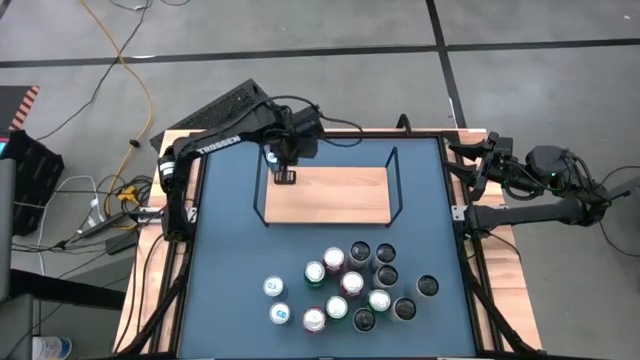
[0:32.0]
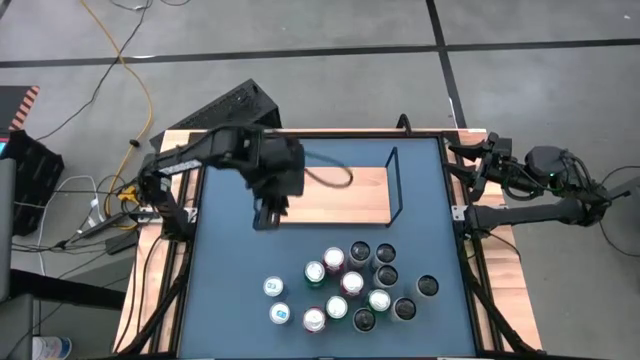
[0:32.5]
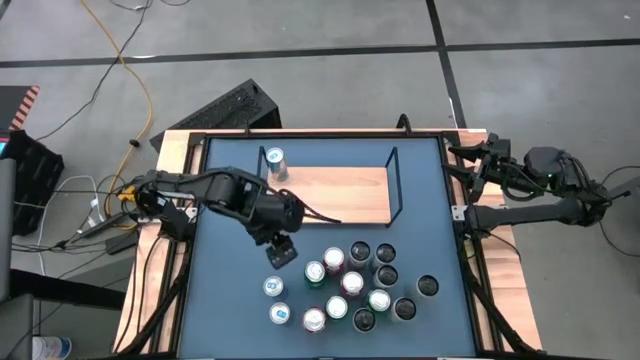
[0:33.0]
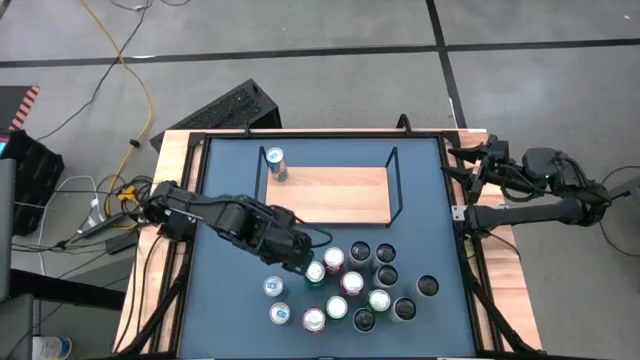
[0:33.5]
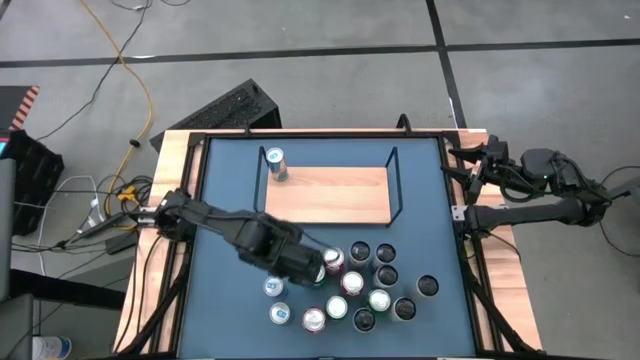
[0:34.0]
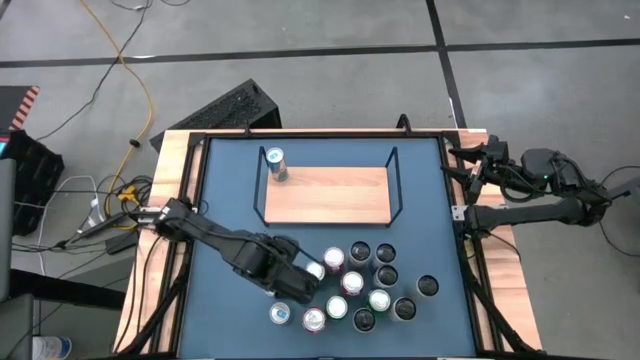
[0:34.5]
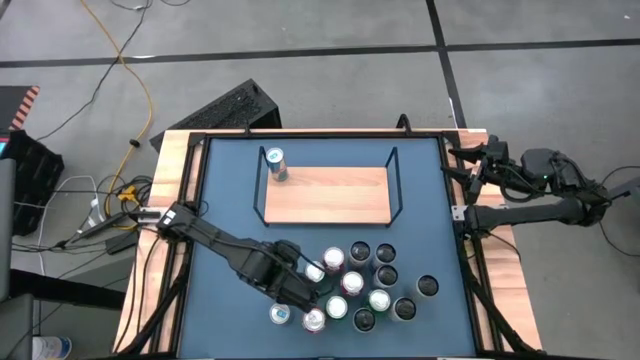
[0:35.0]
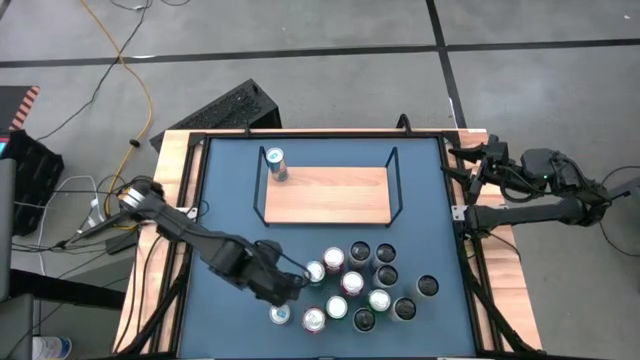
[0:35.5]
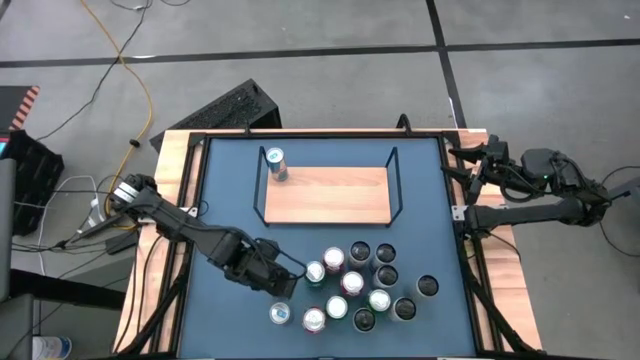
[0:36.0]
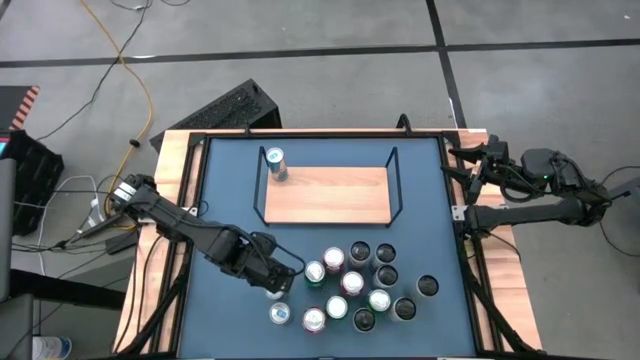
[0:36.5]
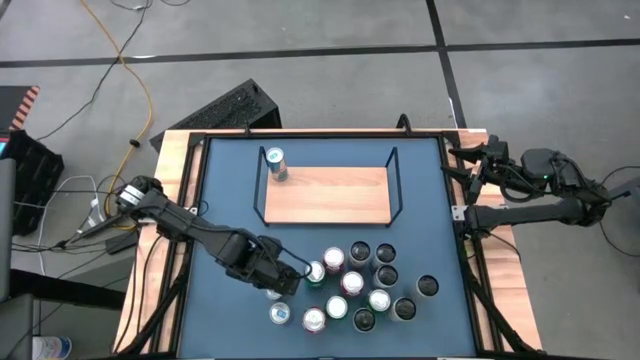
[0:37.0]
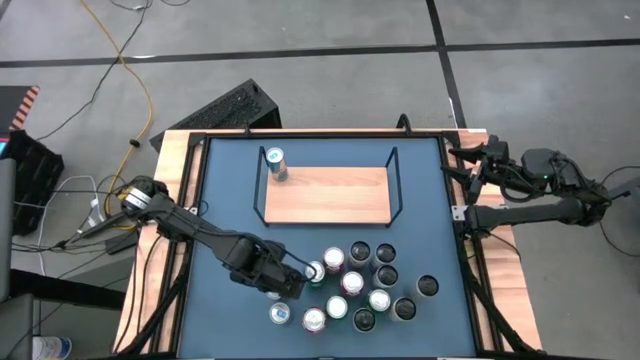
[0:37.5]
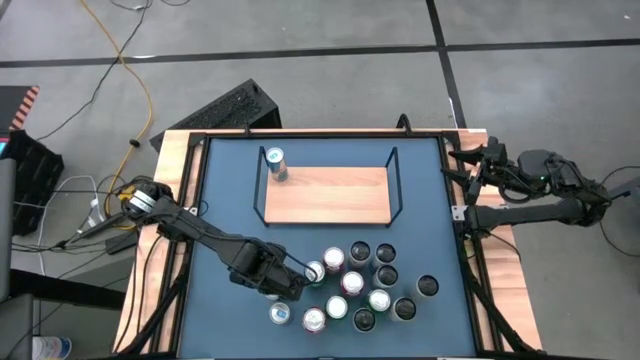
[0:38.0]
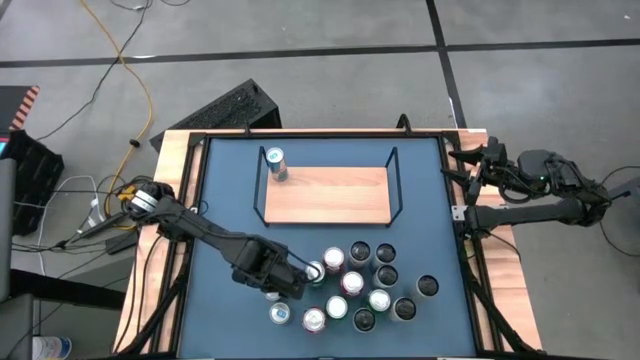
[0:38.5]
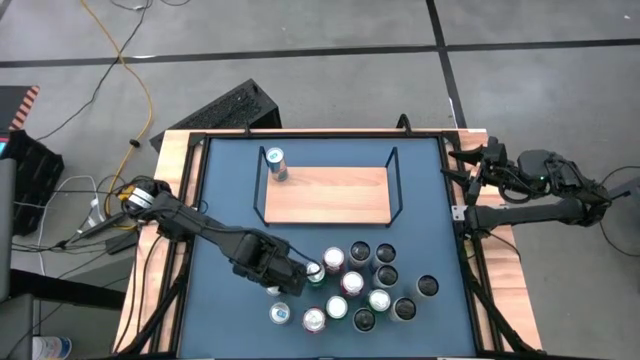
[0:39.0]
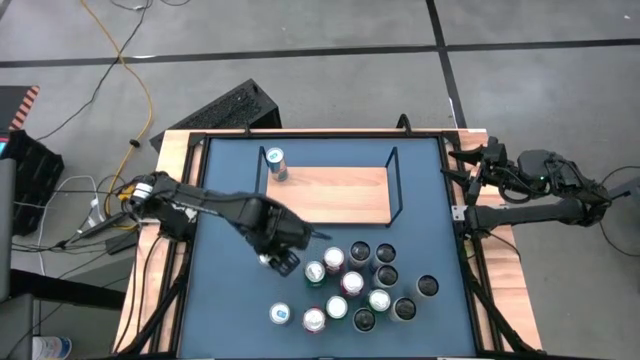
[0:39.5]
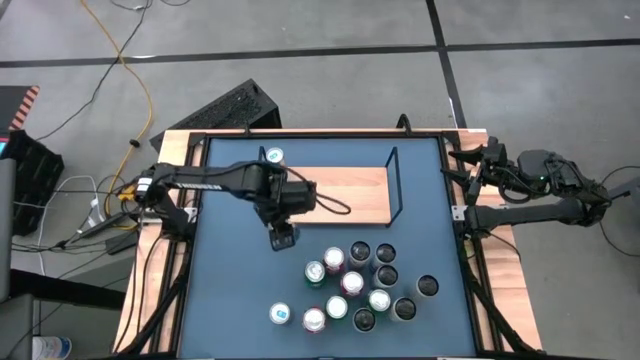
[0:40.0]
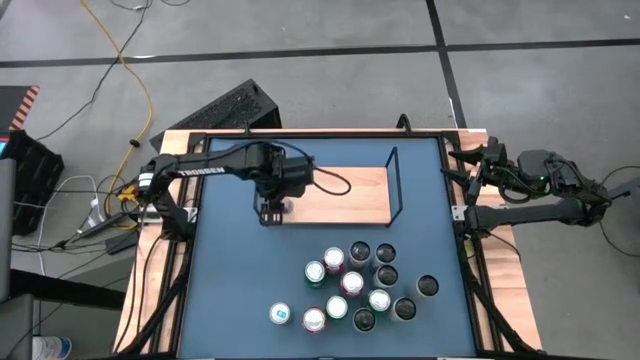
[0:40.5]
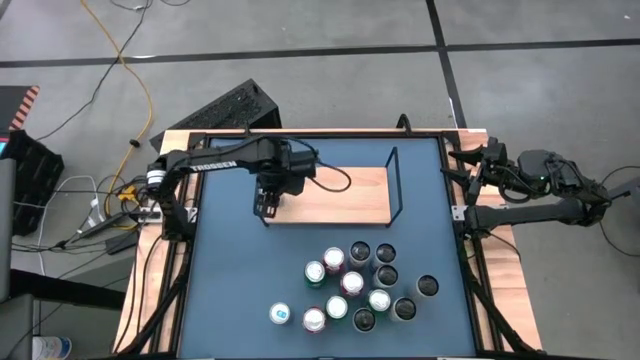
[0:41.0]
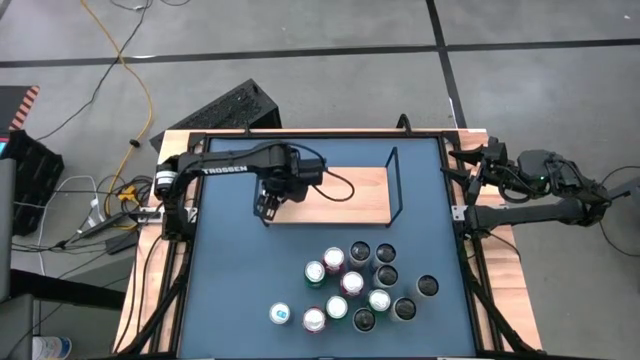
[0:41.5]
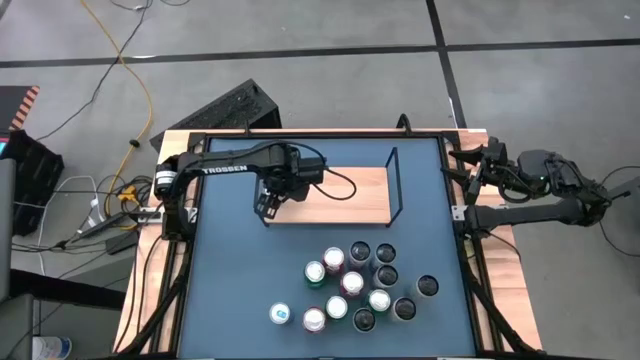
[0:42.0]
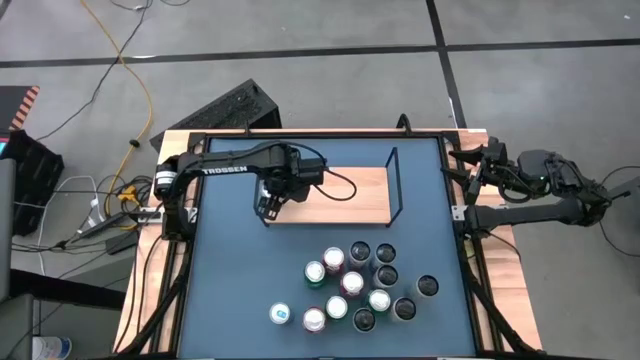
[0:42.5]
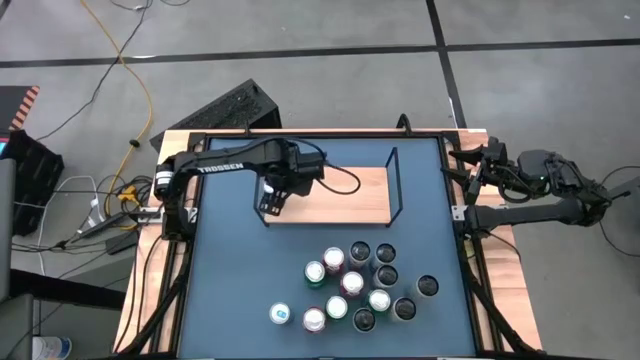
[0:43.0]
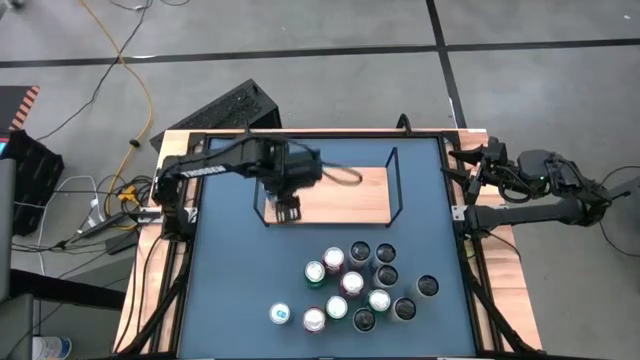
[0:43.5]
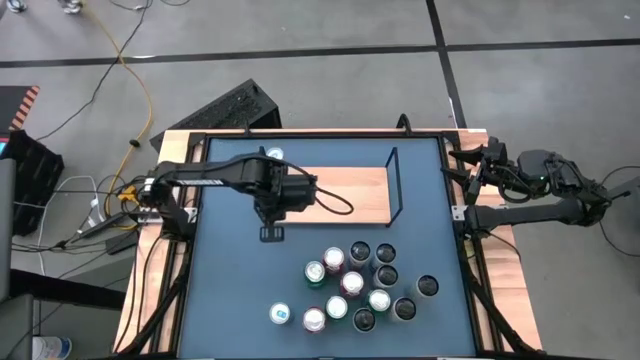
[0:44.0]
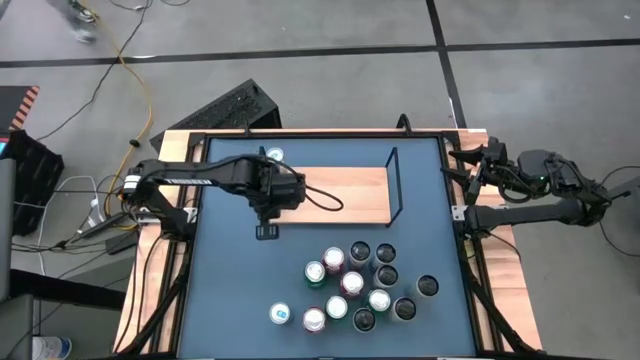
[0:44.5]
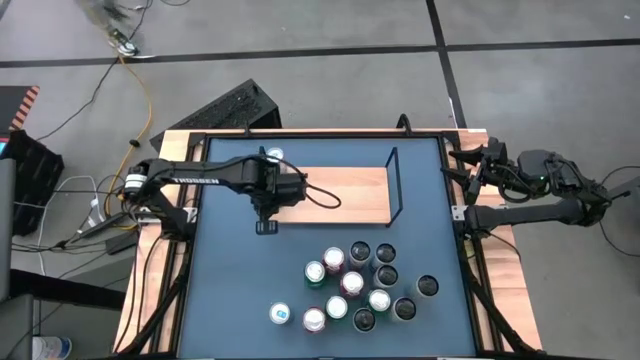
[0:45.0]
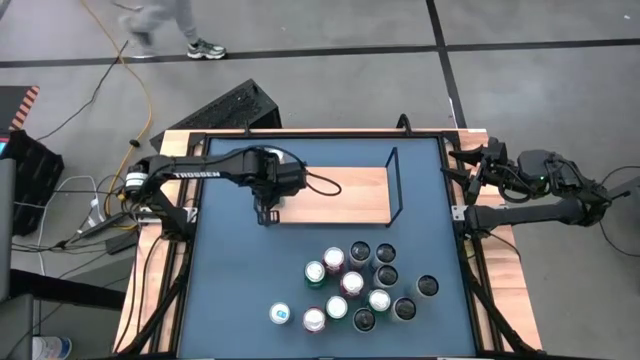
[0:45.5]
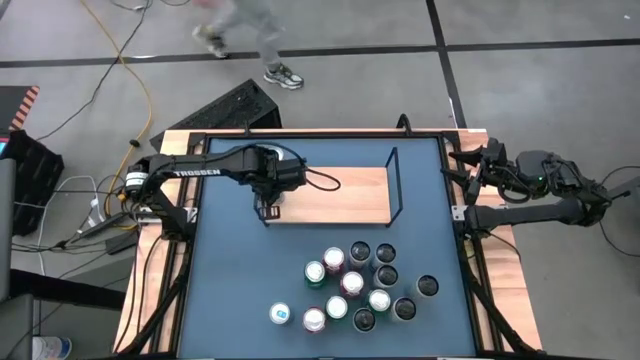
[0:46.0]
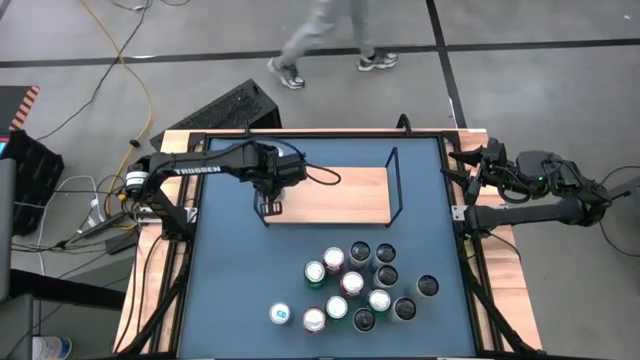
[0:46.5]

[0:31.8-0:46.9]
Task: Place canned beverage on shelf
Put the top blue soda can on the shelf aligned with the other blue soda can
